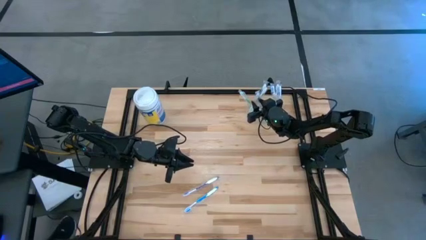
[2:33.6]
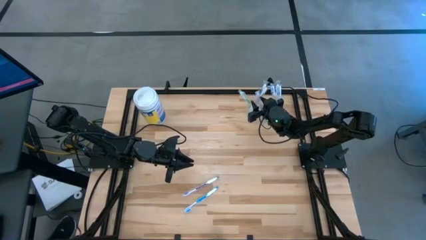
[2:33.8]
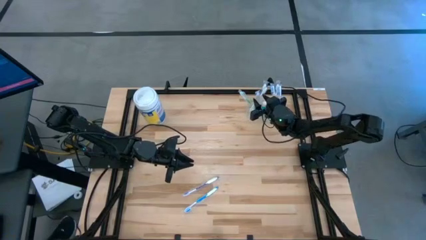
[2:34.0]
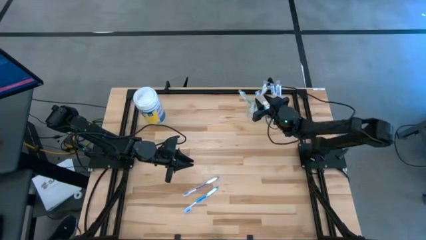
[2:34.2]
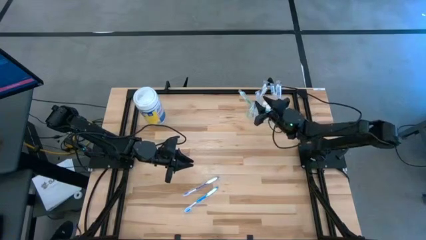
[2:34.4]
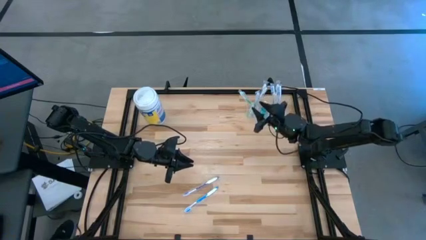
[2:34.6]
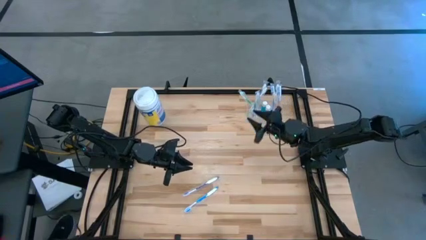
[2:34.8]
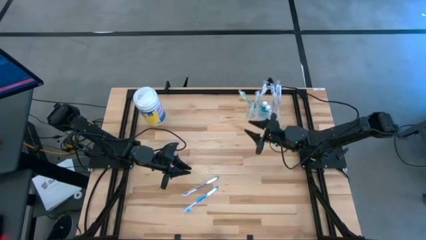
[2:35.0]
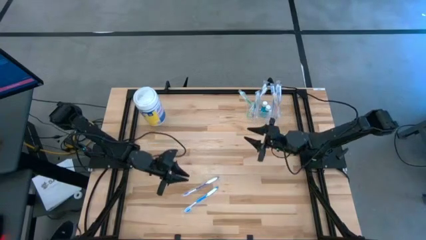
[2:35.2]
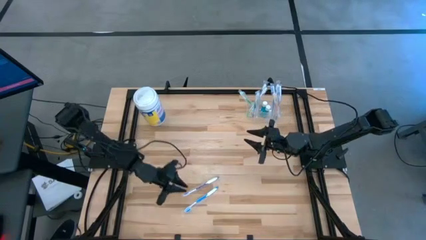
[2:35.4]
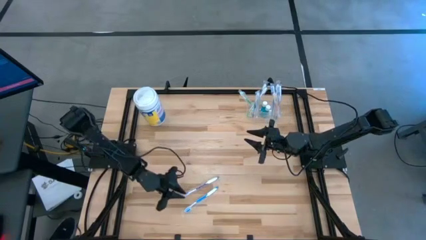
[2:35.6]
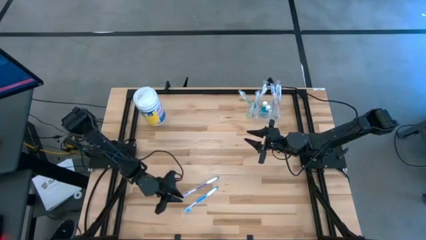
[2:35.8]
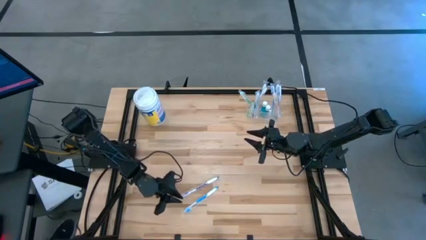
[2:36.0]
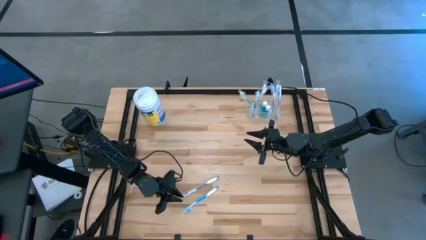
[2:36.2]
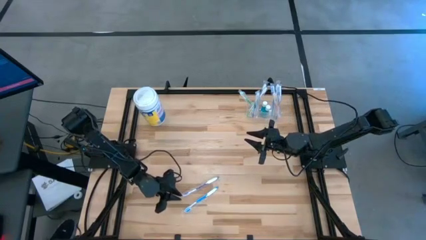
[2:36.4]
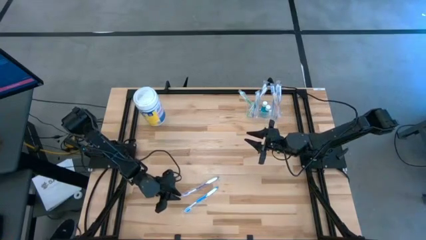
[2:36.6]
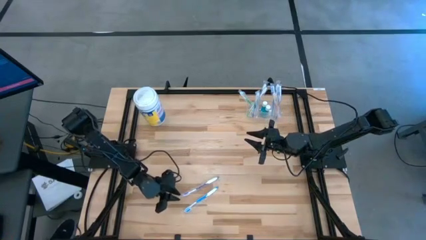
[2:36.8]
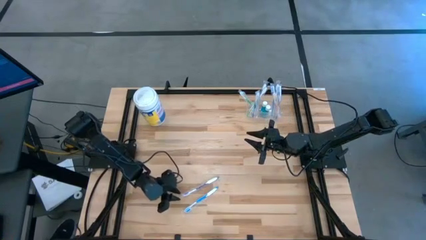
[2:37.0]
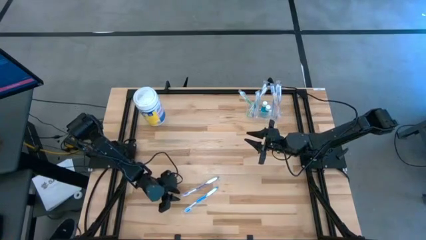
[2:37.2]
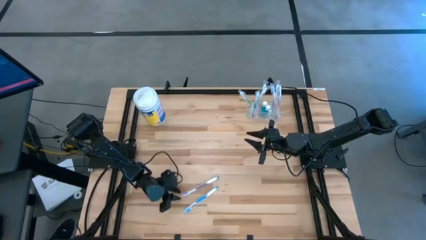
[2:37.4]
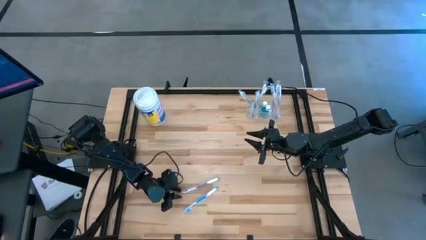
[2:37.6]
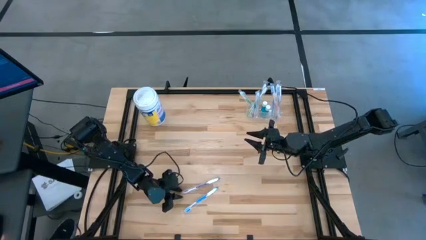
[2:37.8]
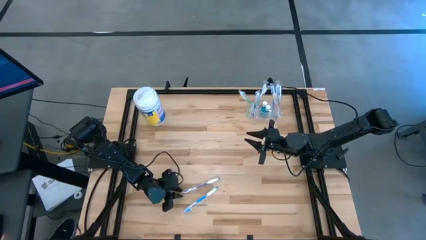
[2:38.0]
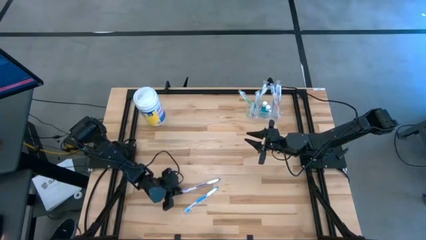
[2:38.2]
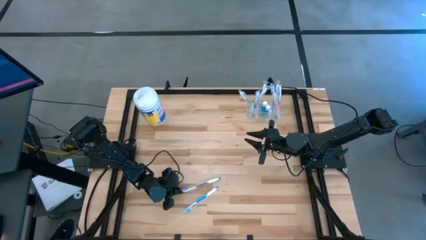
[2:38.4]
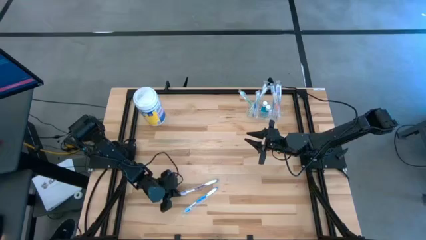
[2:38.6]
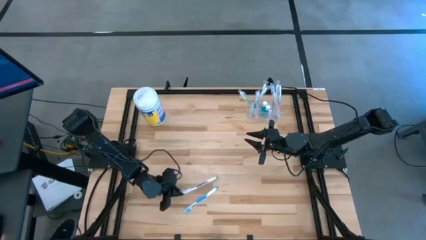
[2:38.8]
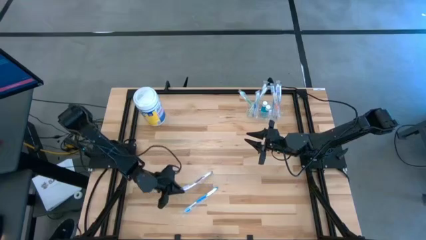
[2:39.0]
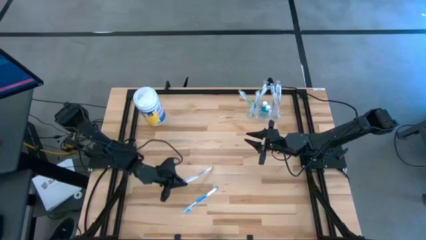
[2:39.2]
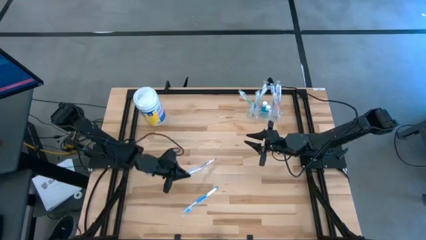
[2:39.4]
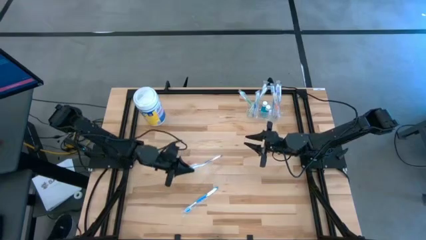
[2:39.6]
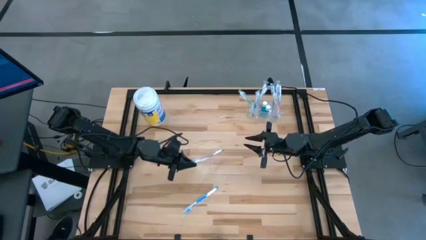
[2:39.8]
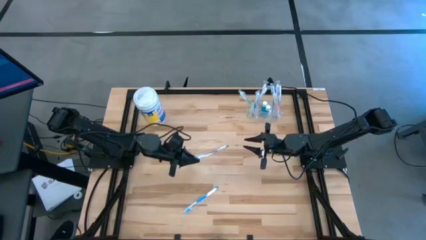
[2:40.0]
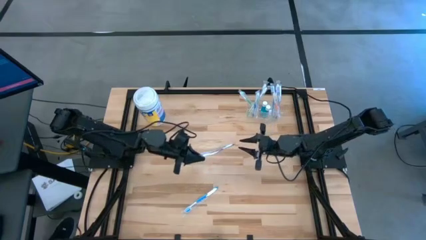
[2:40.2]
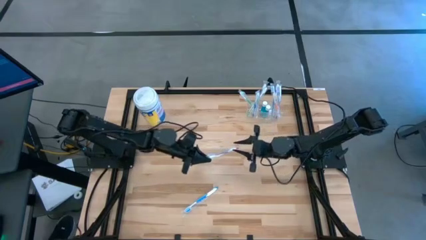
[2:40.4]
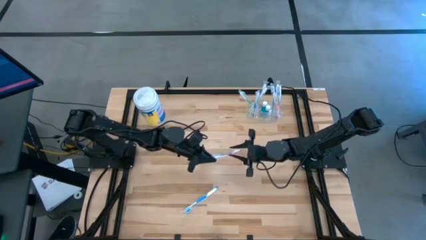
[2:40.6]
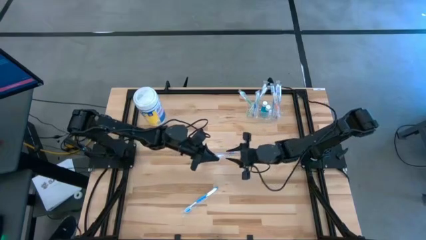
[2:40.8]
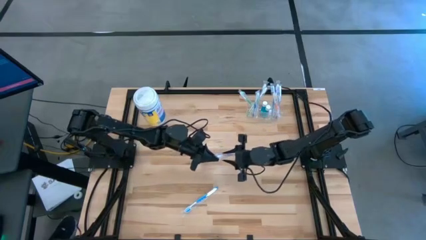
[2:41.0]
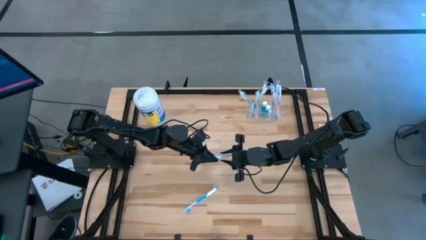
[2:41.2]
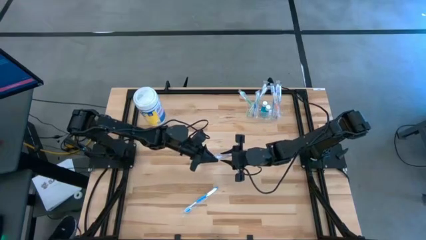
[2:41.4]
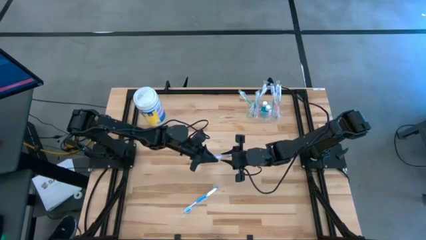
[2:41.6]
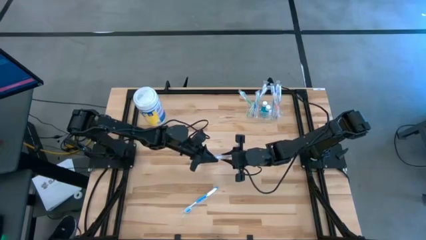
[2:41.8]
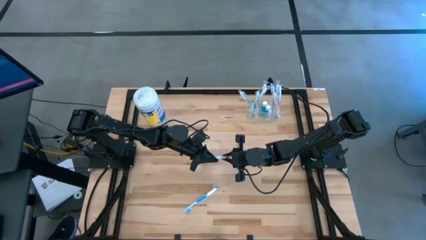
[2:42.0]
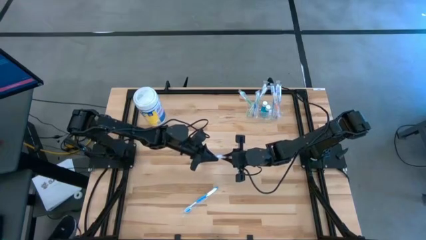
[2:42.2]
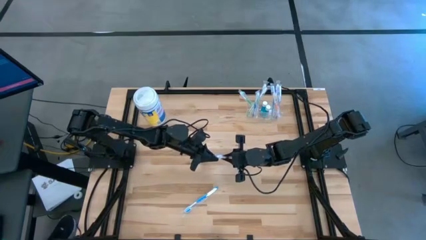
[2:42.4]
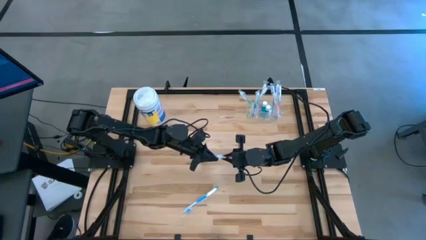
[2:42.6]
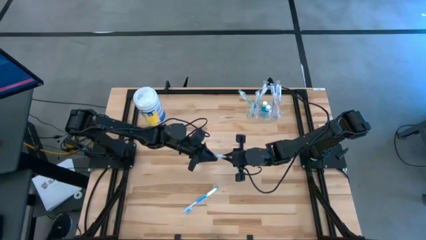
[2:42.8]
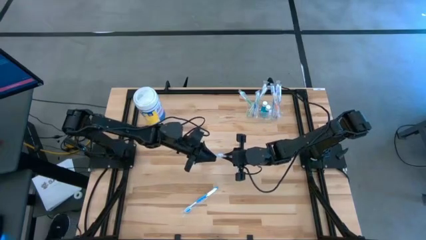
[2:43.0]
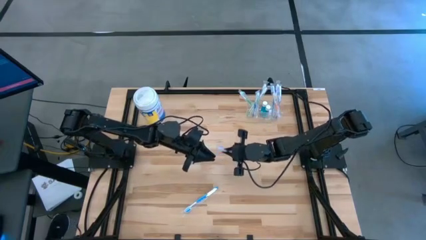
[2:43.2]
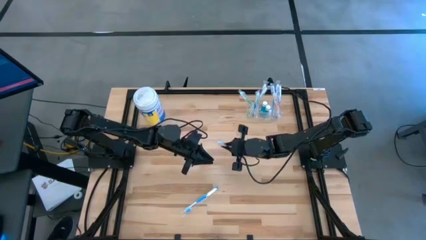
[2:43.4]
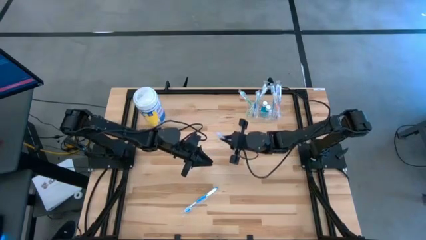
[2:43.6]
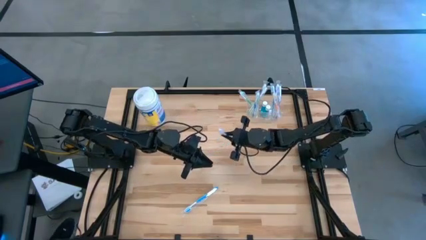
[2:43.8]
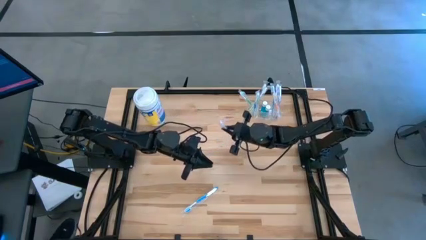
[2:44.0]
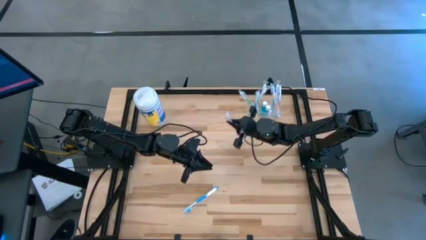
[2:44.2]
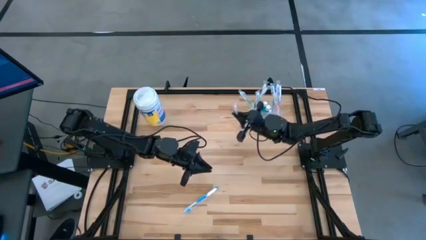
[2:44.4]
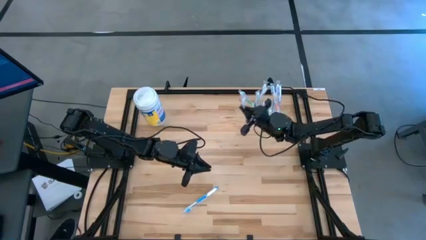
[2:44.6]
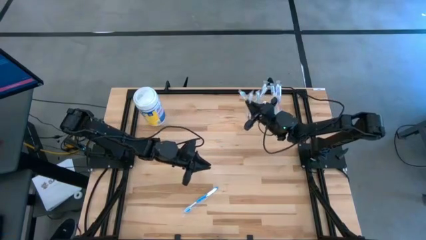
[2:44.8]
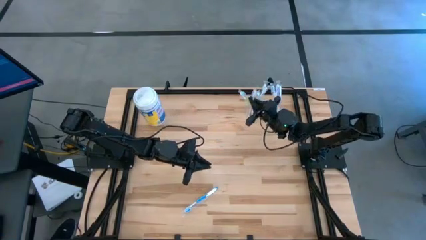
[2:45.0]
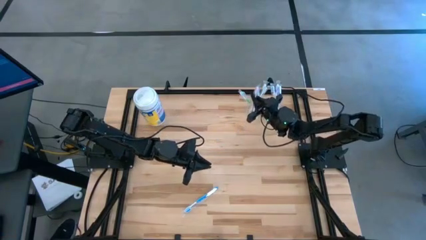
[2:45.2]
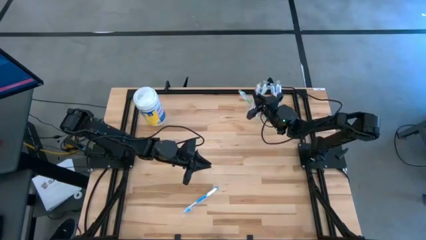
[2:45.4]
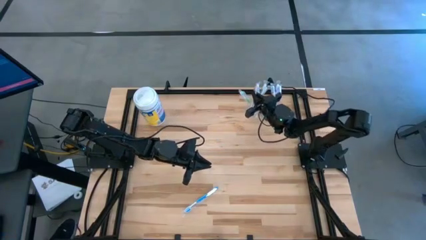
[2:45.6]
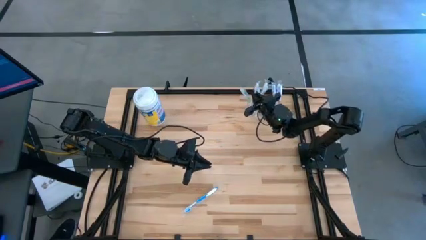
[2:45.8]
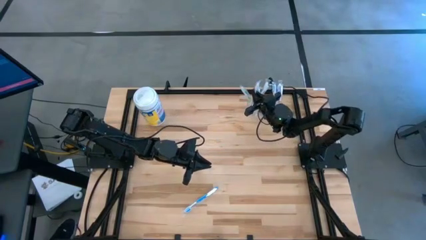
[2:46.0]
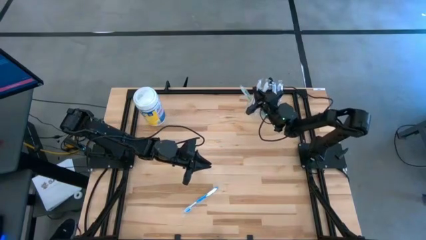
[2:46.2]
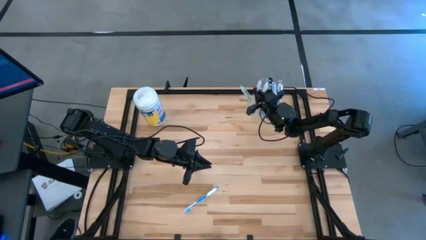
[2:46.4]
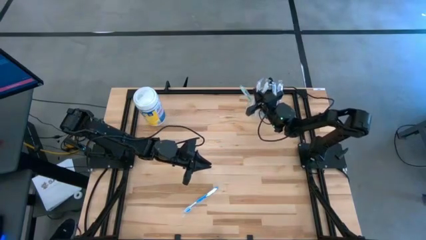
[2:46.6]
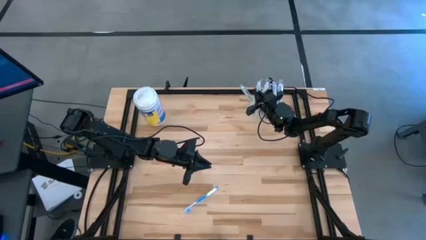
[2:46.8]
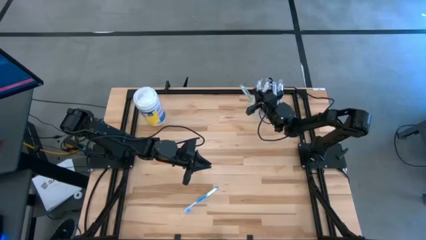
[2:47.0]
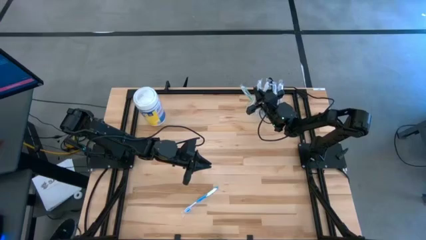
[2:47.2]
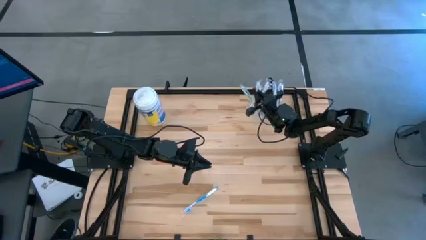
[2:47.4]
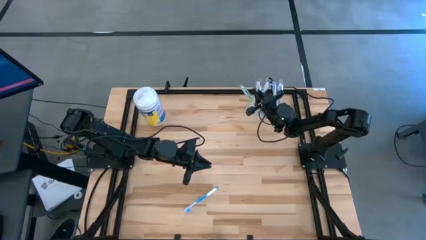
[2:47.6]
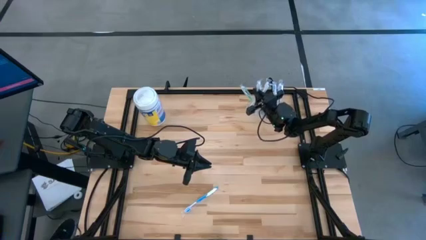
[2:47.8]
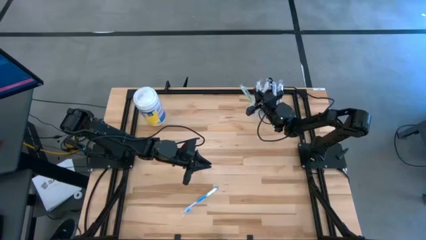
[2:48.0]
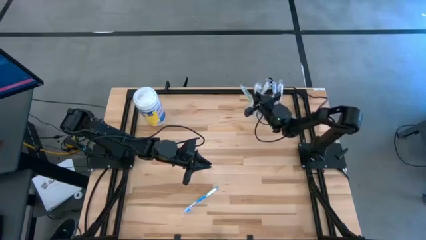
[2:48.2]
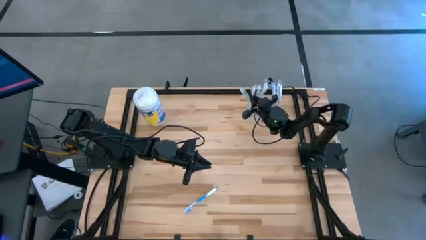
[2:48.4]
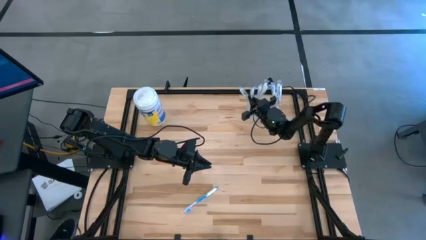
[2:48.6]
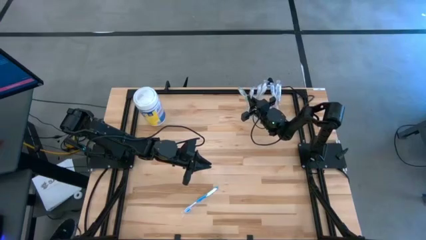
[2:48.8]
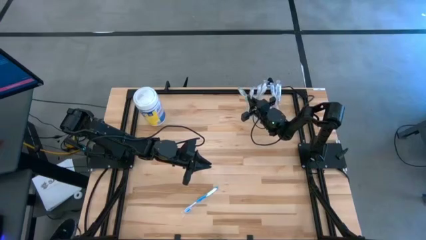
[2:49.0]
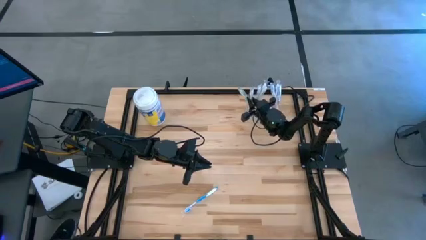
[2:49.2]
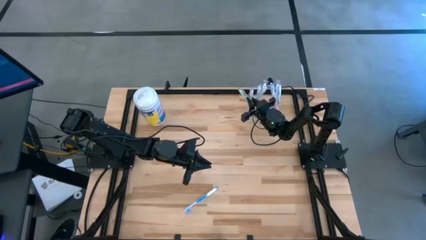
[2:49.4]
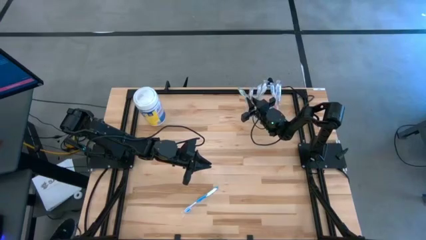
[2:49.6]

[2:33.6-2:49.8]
Task: Pick & Place toothbrushing station
Put the purple toothbrush into the left transparent organizer
